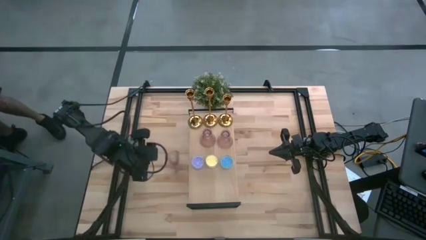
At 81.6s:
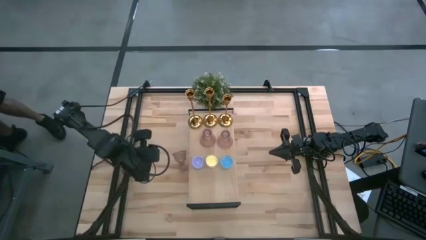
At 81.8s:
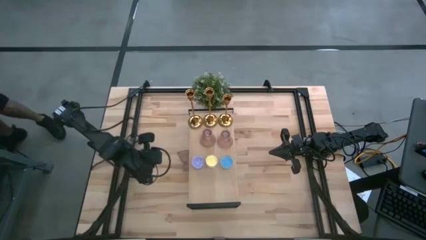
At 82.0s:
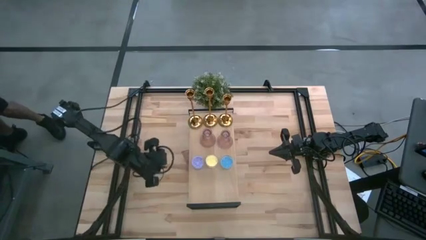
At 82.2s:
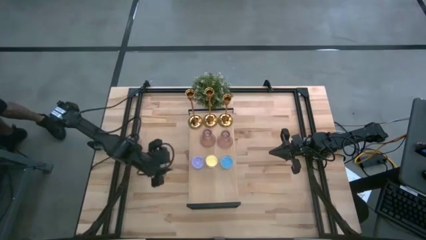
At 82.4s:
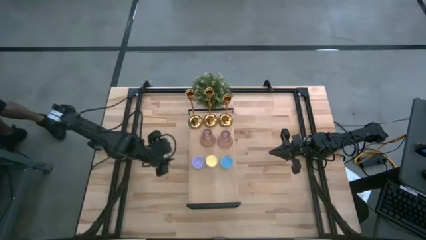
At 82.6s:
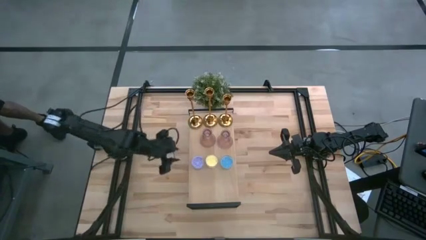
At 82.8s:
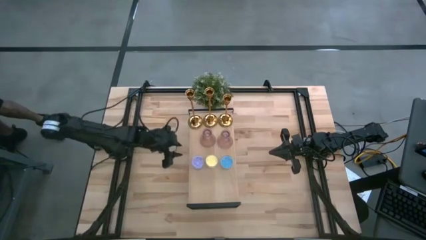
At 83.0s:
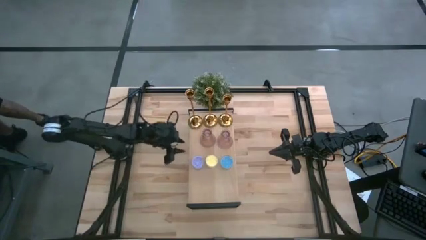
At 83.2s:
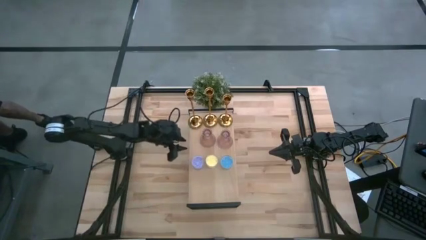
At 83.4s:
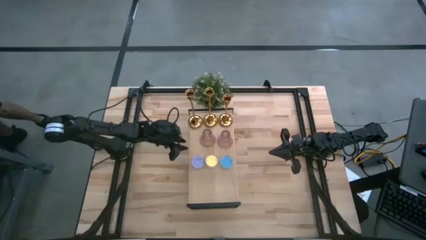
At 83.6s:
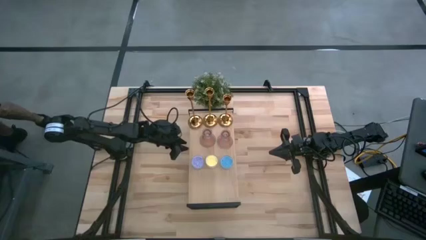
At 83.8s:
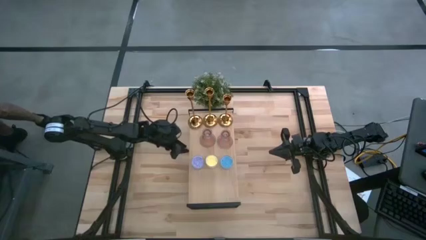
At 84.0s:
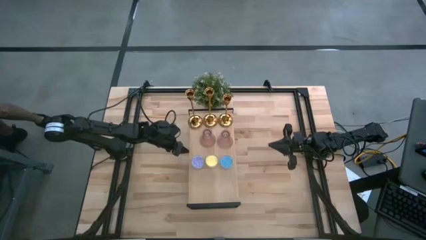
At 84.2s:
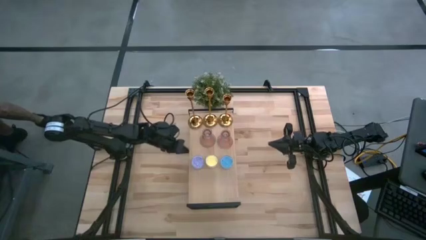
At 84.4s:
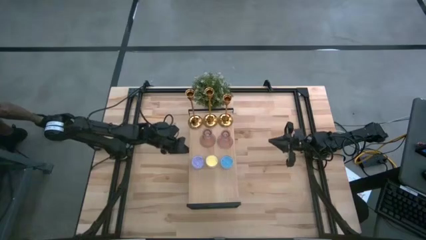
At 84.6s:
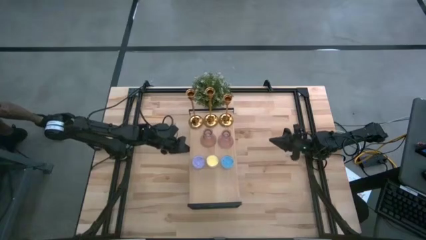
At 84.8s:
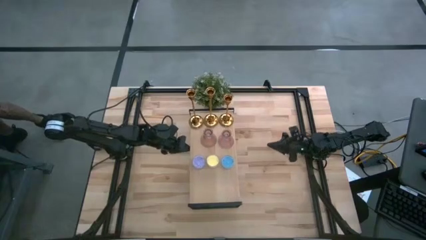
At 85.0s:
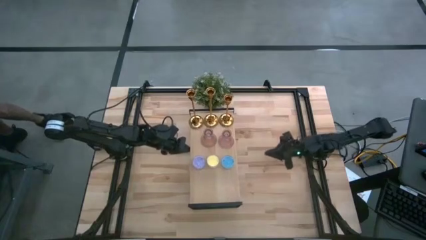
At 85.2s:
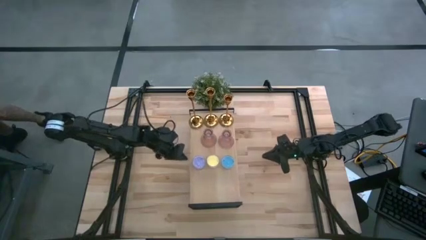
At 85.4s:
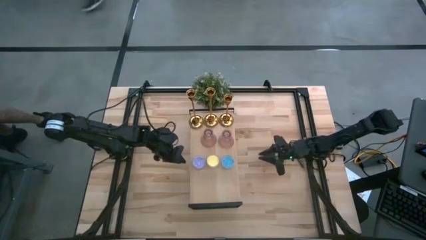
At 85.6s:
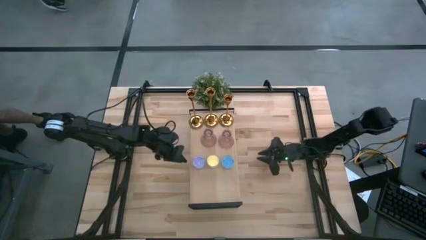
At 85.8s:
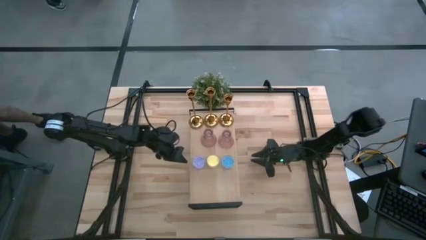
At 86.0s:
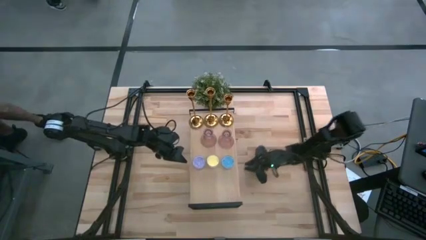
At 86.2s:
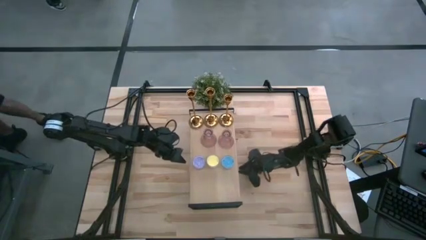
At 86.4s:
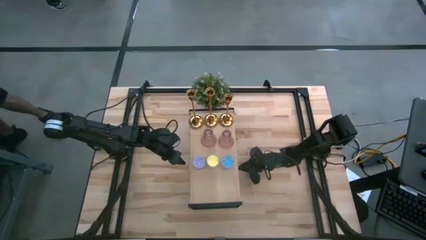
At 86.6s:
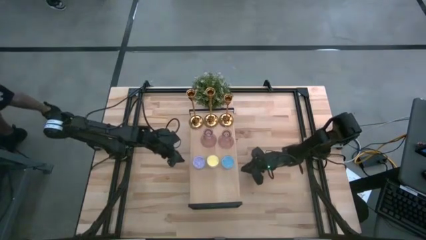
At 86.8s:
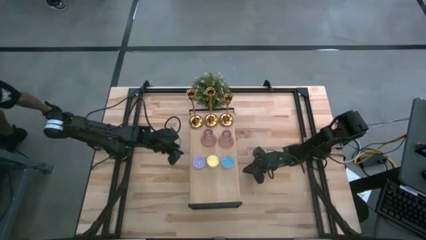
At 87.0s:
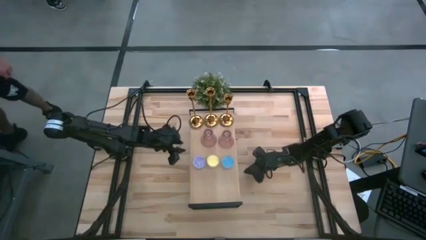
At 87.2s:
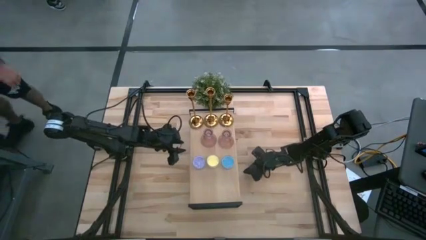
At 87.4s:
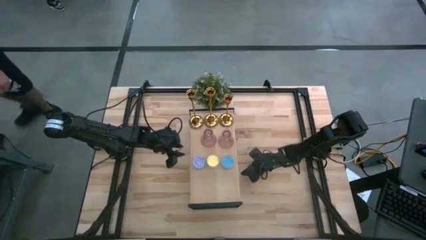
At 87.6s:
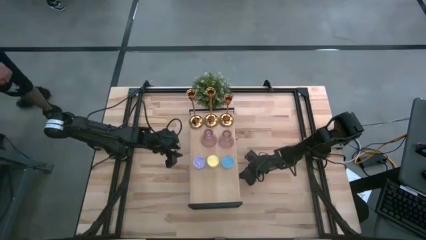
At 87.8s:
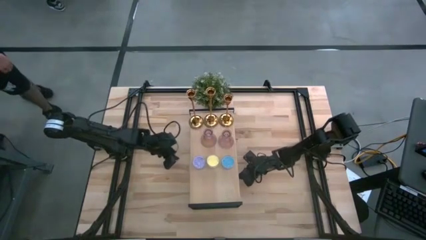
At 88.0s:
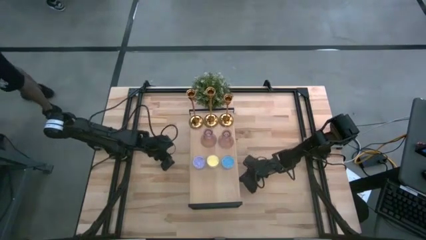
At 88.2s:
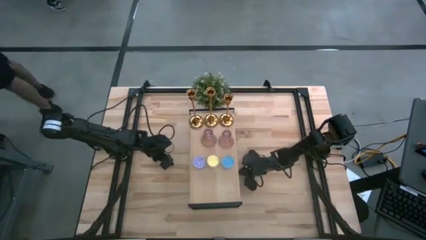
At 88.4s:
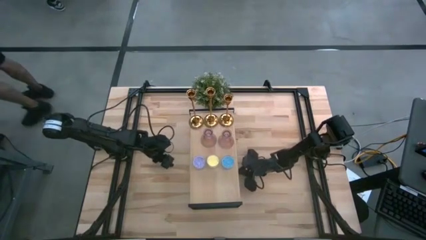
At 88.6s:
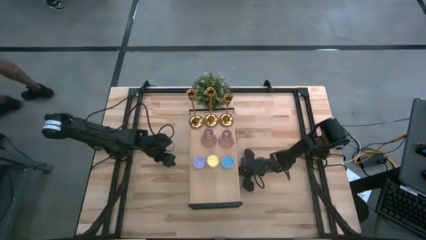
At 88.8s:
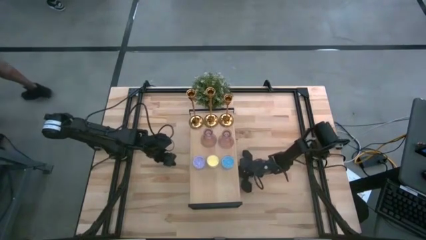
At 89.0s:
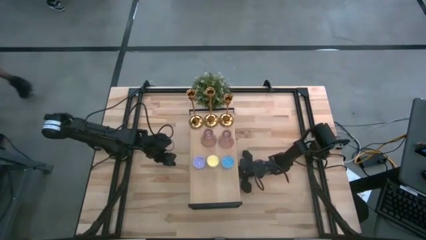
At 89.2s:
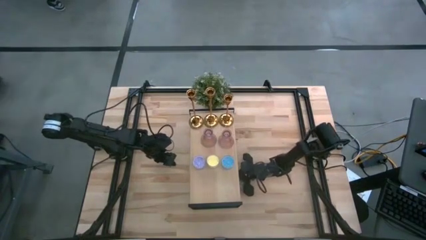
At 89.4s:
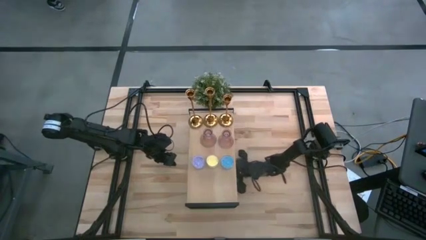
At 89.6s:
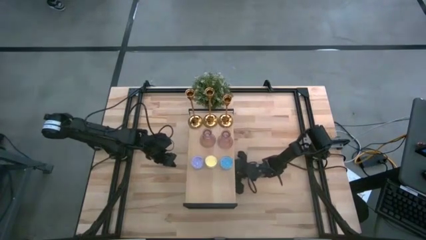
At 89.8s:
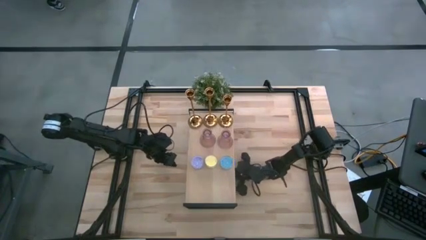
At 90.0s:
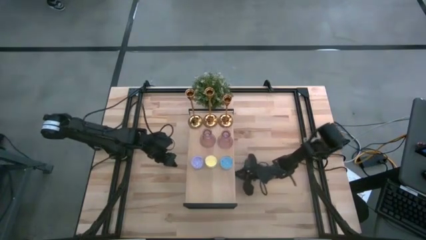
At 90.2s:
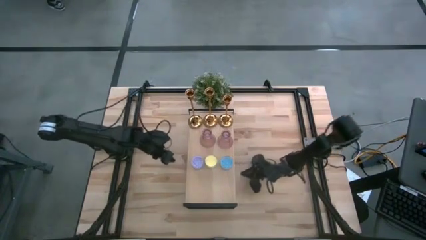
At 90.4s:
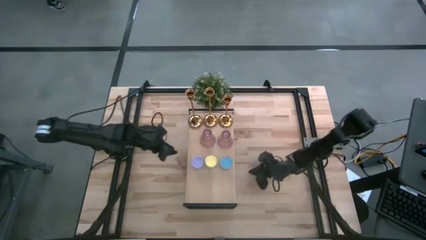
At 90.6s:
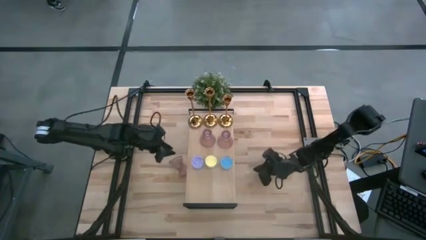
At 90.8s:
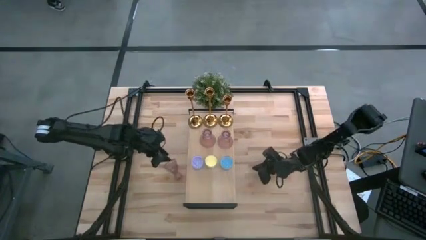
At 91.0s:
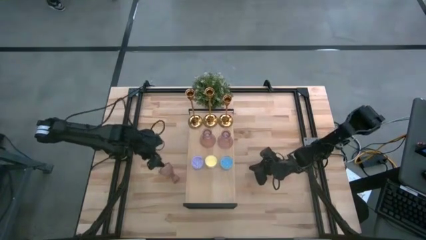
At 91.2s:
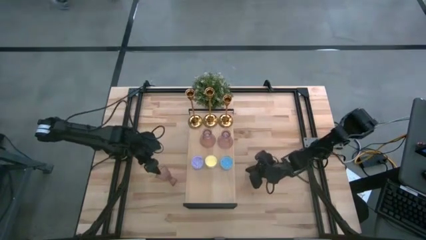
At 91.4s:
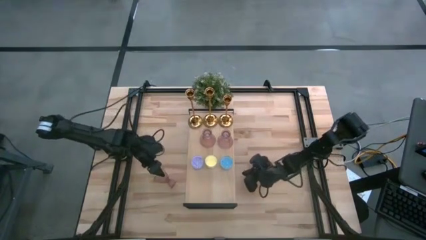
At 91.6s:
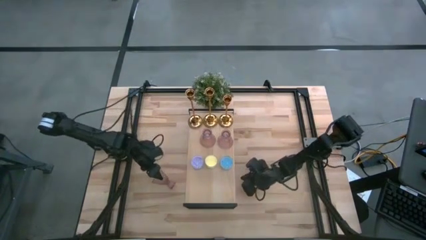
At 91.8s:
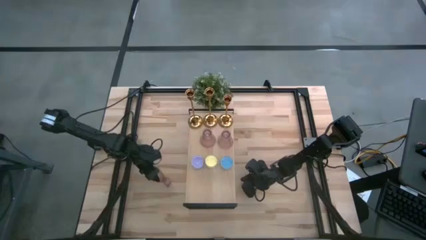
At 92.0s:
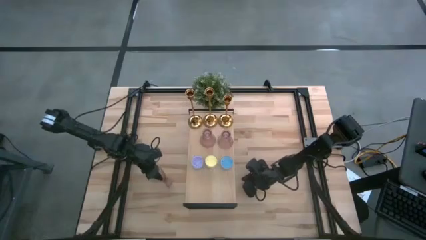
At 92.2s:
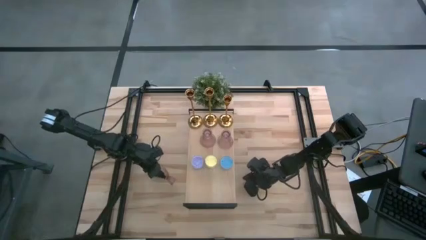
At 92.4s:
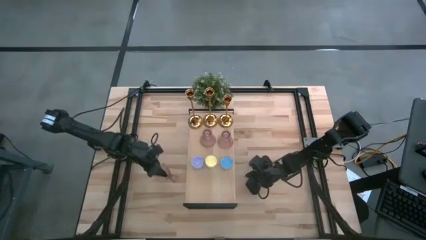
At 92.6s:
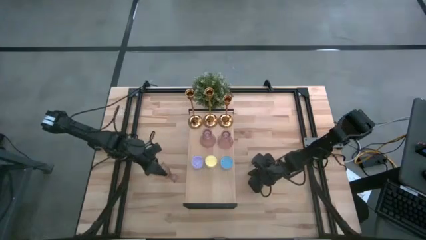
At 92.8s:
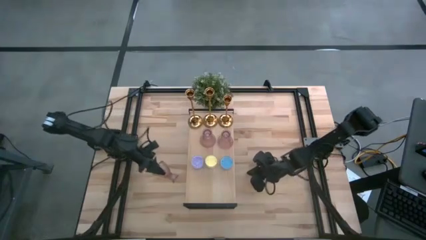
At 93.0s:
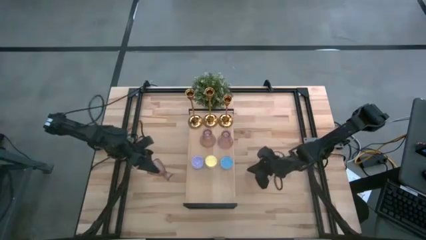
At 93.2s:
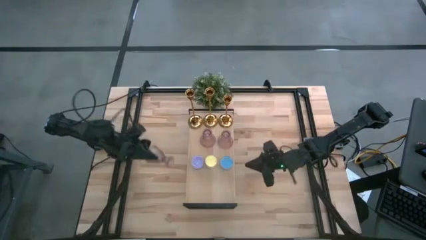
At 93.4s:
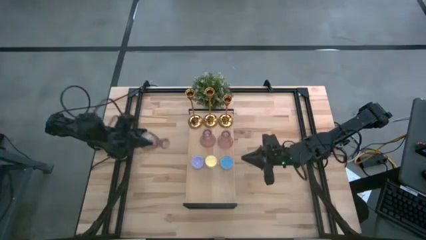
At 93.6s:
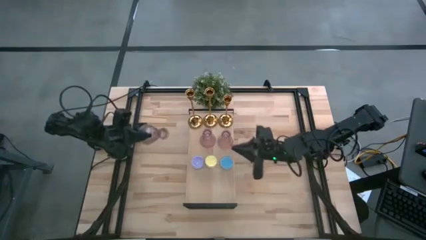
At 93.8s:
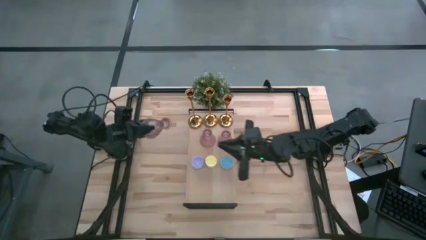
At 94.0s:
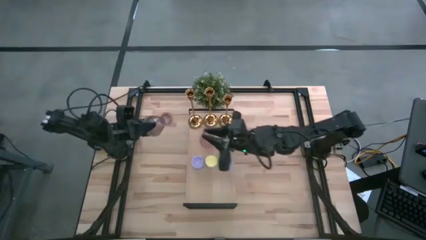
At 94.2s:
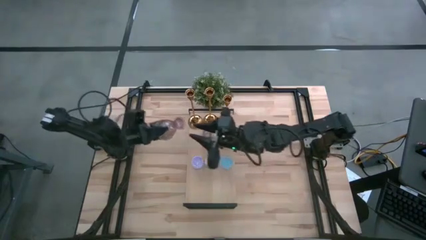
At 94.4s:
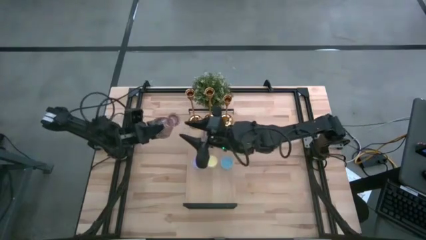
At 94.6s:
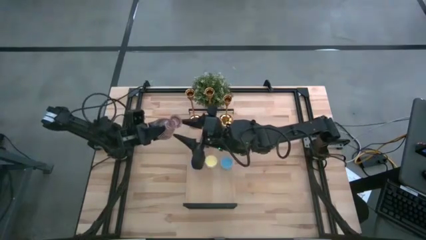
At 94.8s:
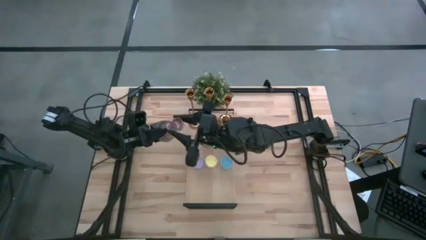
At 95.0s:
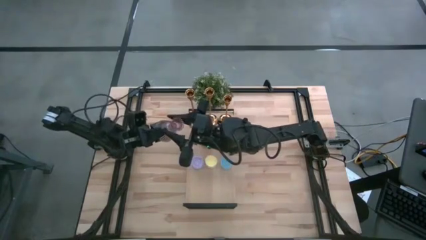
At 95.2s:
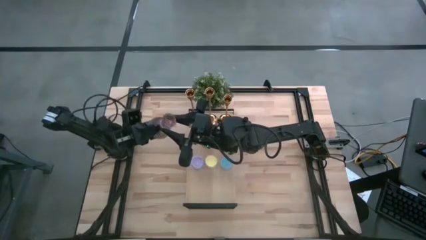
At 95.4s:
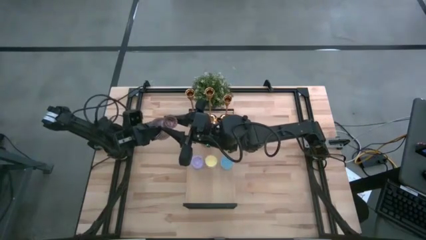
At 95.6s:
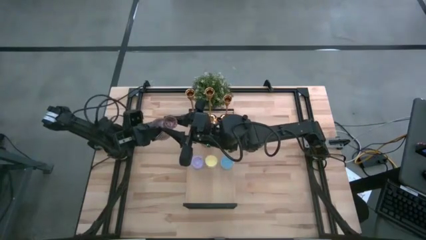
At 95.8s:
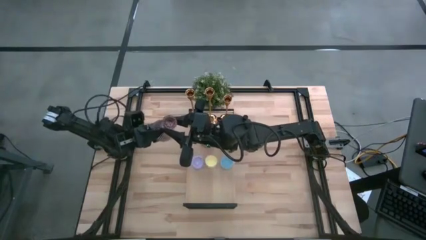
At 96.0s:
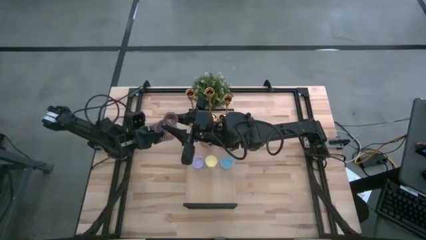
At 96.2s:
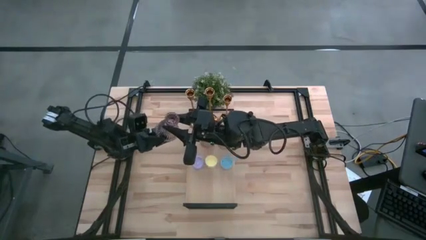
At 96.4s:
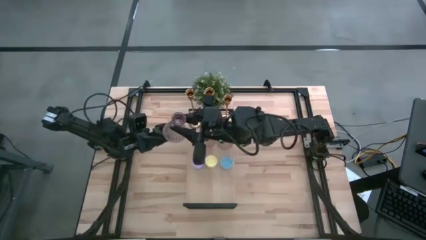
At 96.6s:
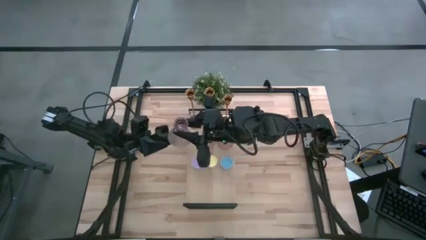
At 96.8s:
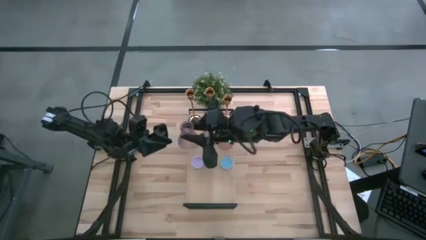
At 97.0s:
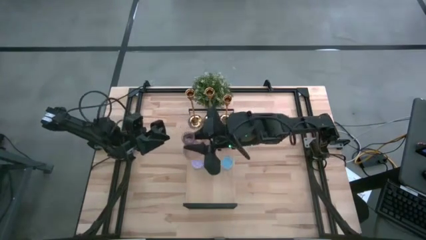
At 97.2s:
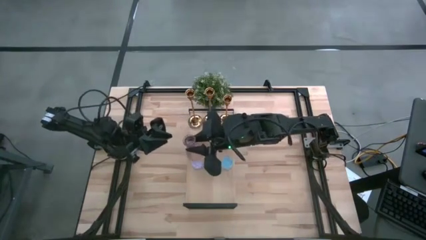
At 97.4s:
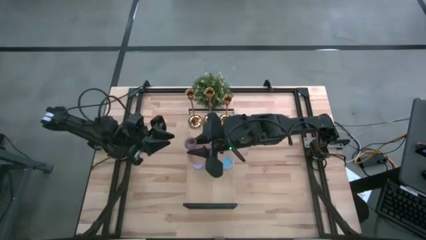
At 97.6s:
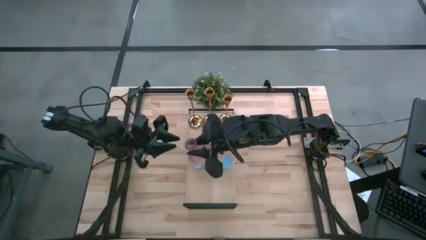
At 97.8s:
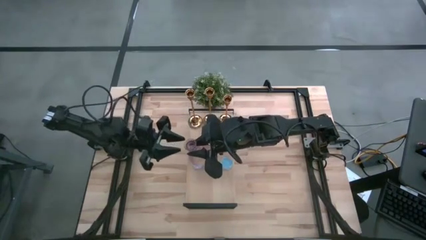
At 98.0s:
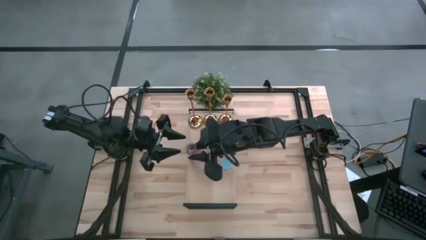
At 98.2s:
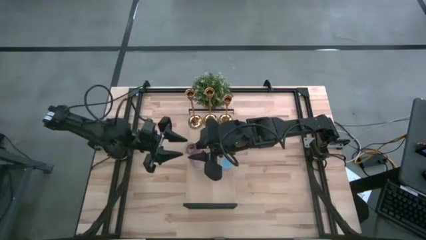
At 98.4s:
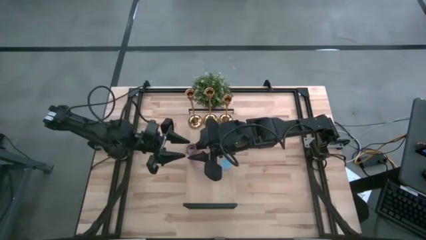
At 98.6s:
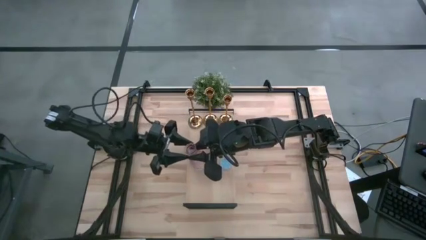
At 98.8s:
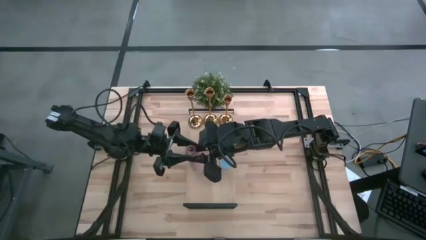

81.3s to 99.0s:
Task: Pick & Place candle stick holders
Put the pink glass candle holder on the shelf aligned with the pink glass candle holders
